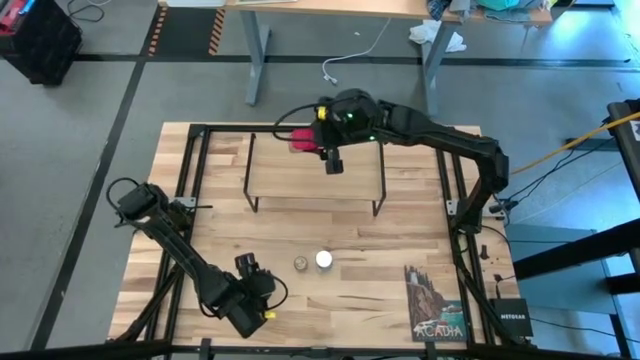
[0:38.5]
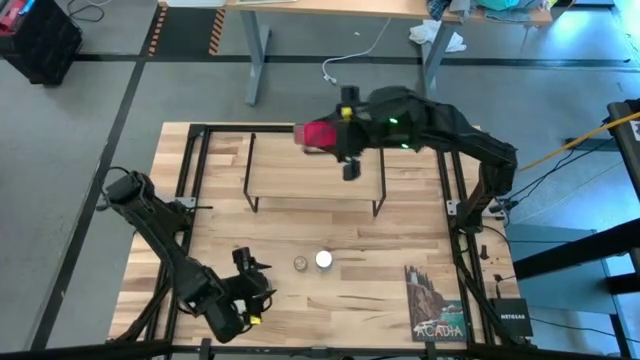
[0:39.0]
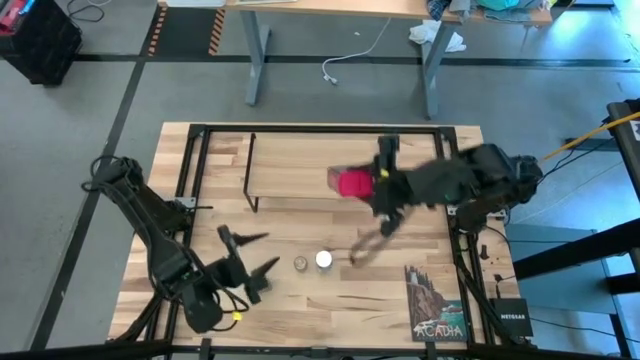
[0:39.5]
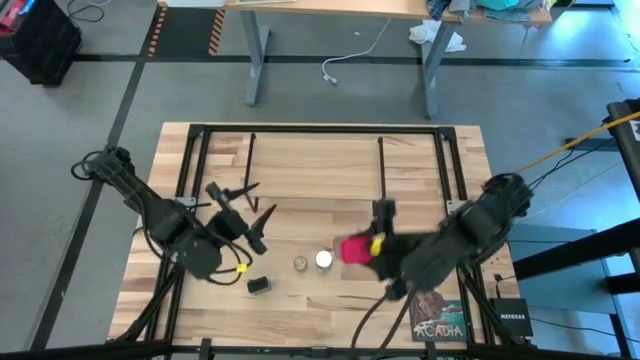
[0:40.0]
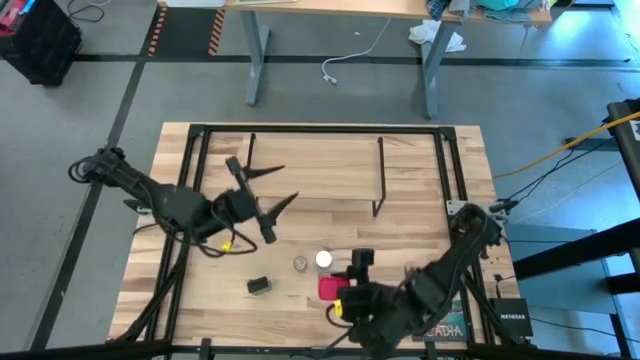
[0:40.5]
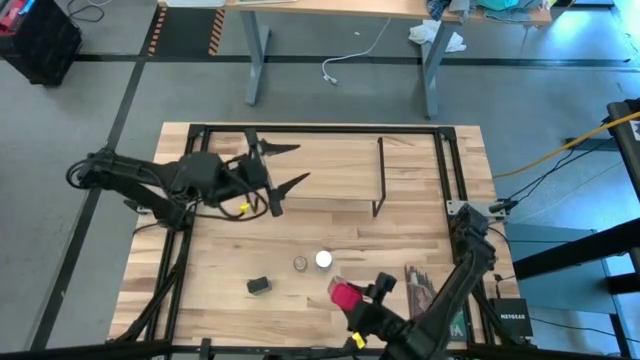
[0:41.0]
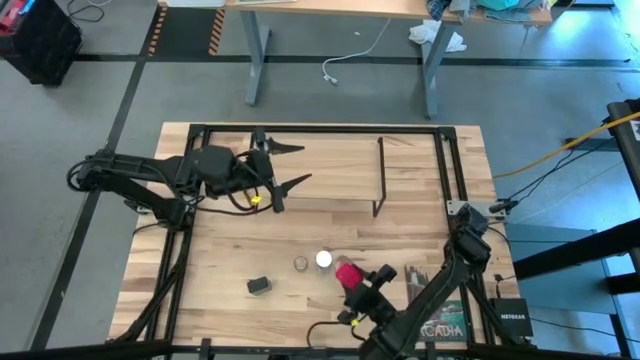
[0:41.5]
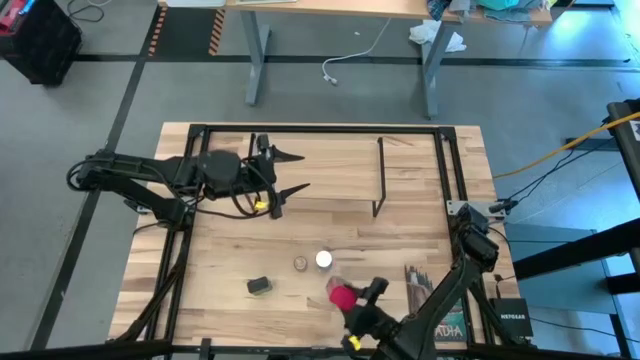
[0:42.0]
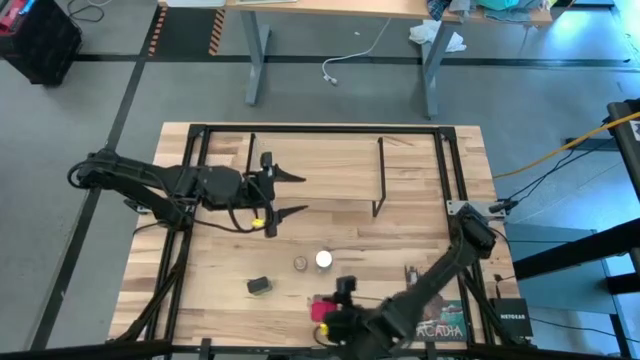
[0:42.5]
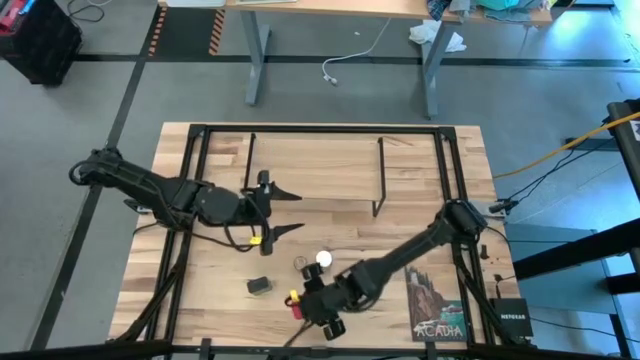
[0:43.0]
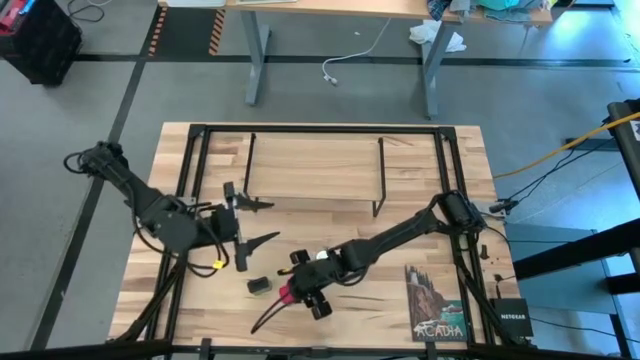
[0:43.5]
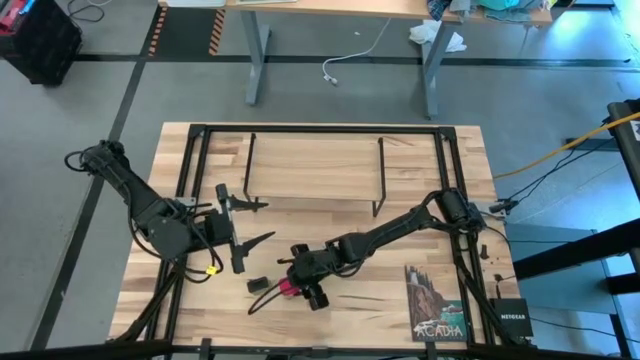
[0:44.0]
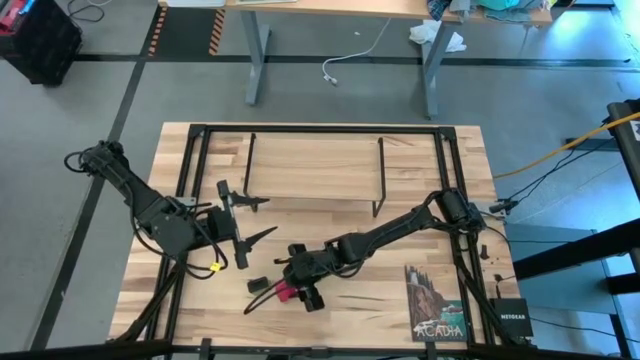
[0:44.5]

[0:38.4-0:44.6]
Task: Shelf spices
Remove the red seasoning can from the shelf

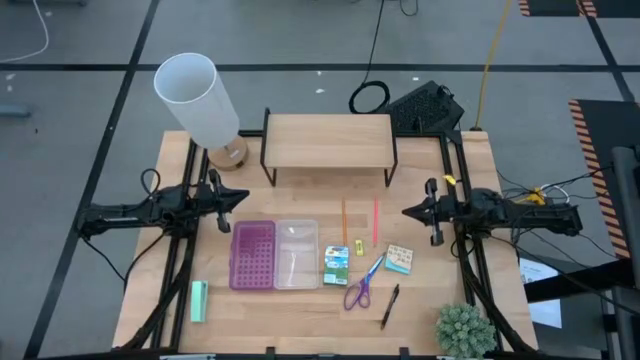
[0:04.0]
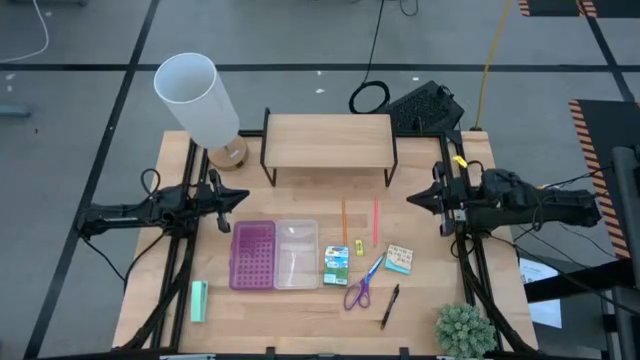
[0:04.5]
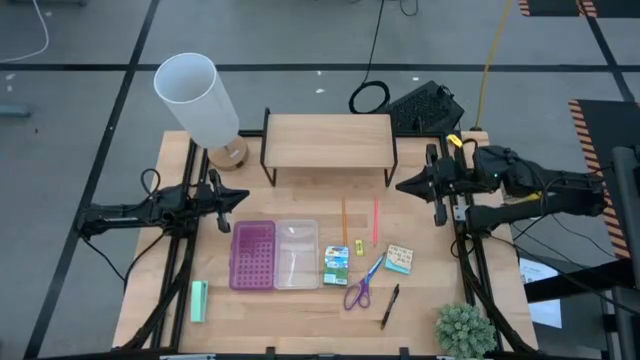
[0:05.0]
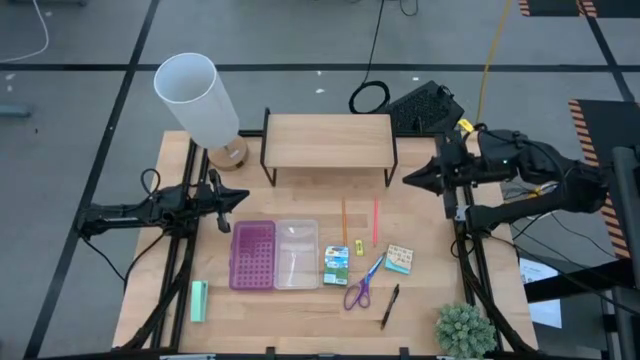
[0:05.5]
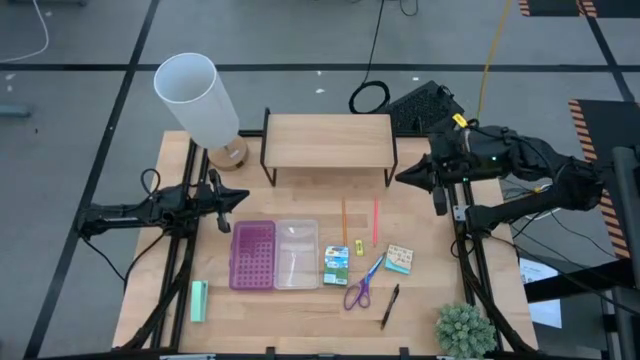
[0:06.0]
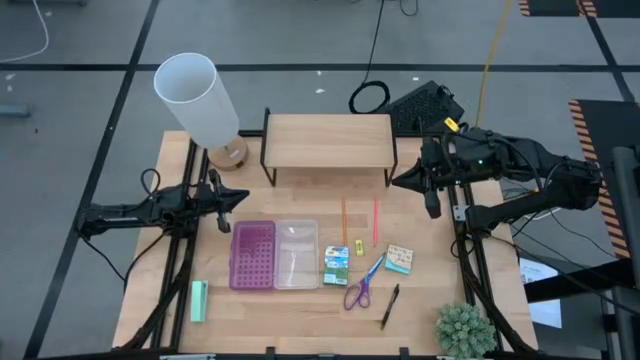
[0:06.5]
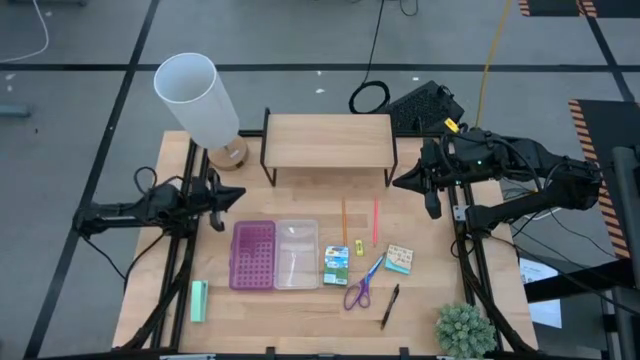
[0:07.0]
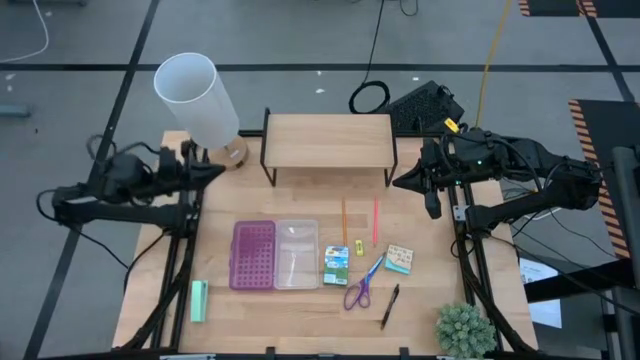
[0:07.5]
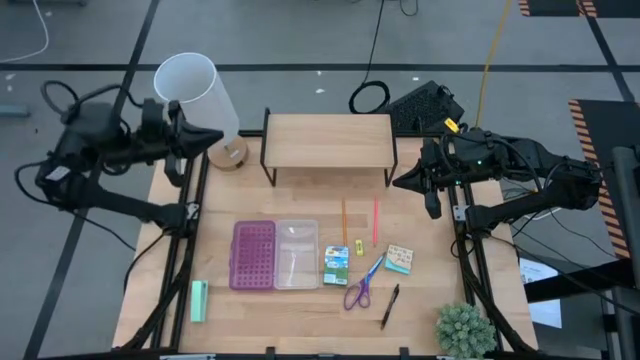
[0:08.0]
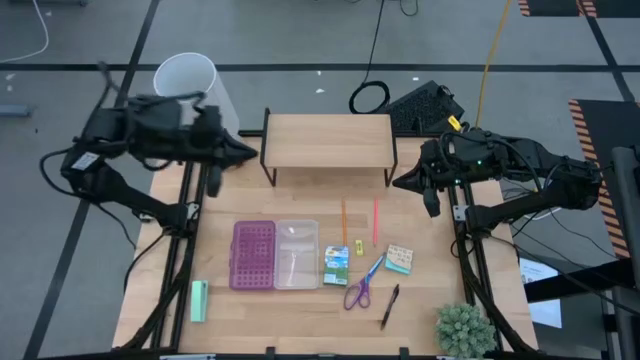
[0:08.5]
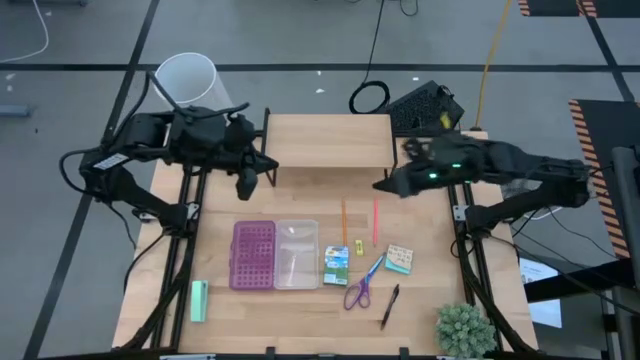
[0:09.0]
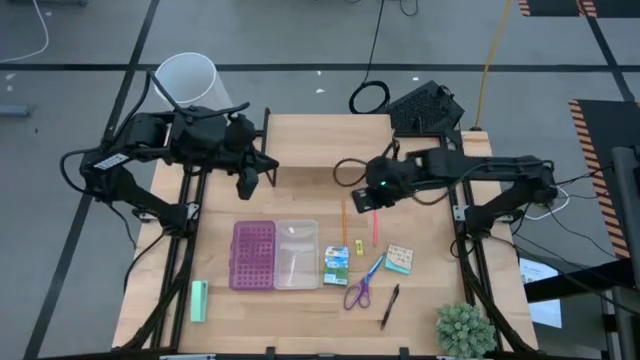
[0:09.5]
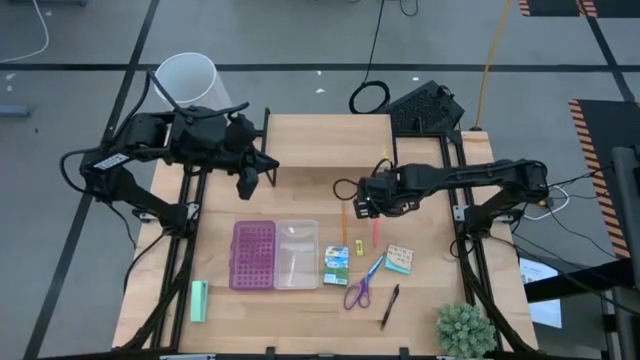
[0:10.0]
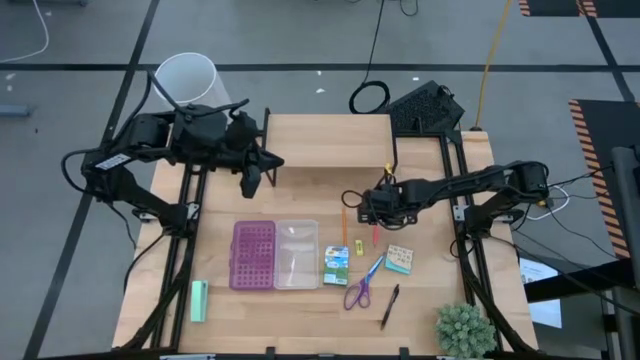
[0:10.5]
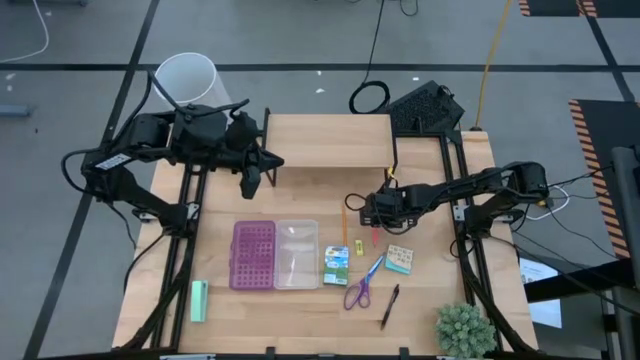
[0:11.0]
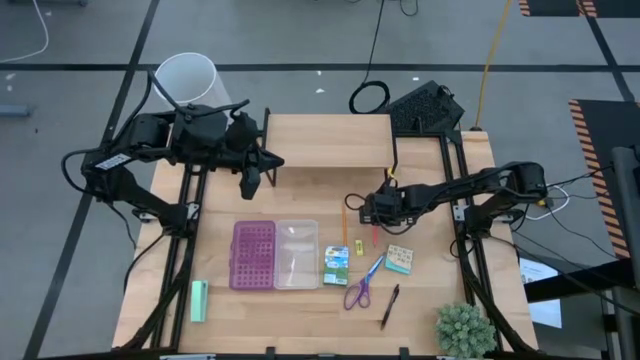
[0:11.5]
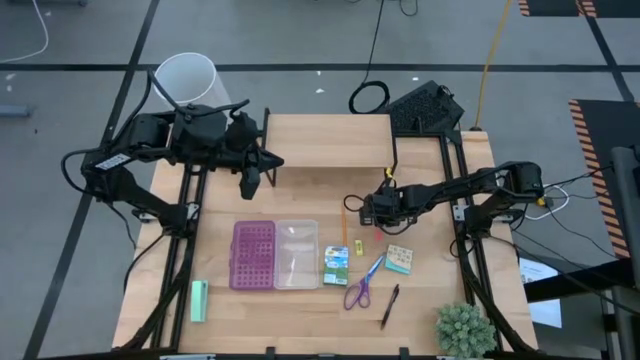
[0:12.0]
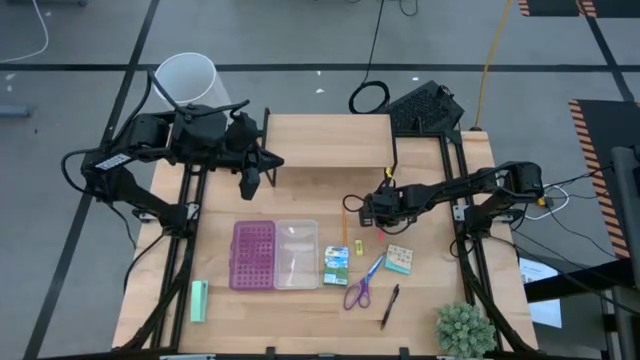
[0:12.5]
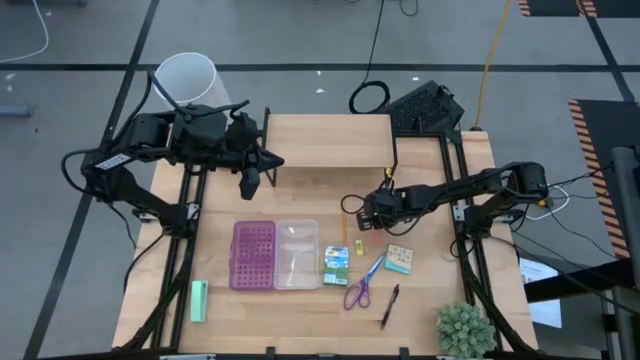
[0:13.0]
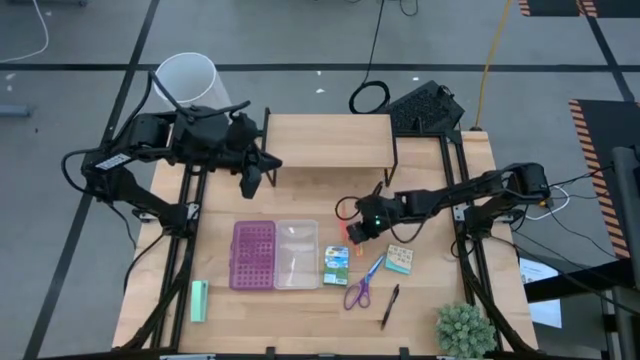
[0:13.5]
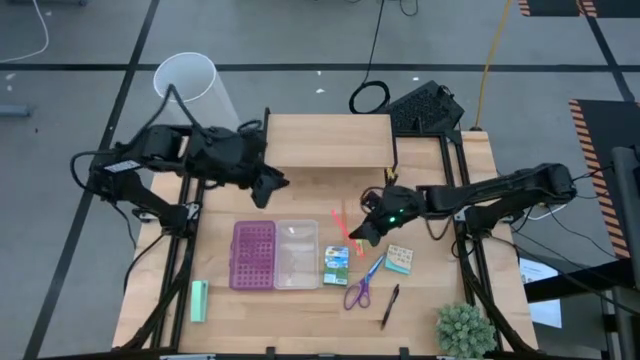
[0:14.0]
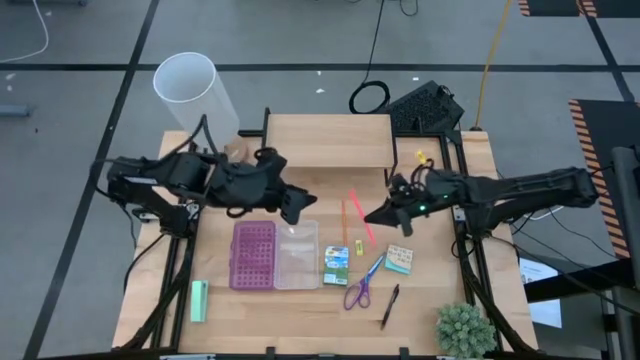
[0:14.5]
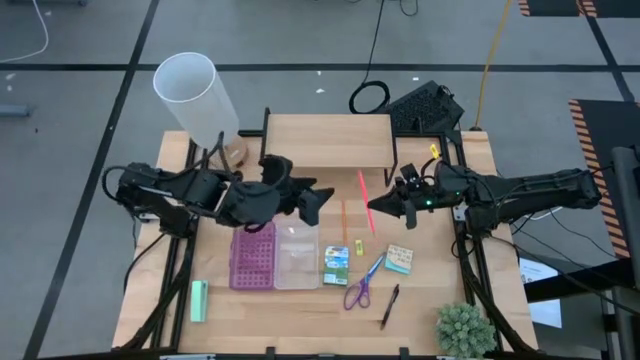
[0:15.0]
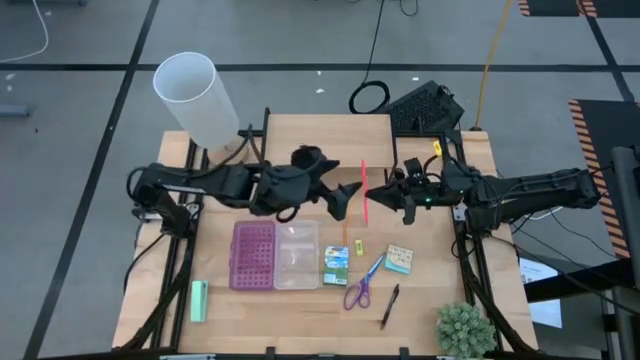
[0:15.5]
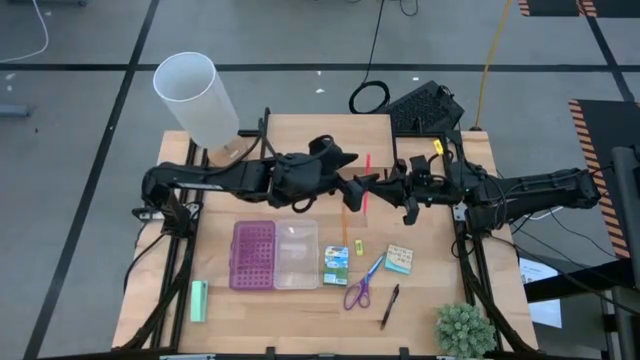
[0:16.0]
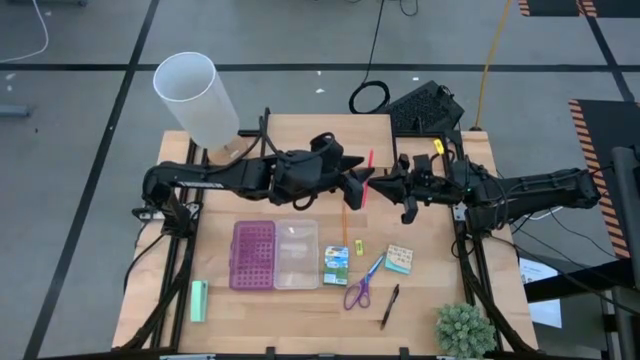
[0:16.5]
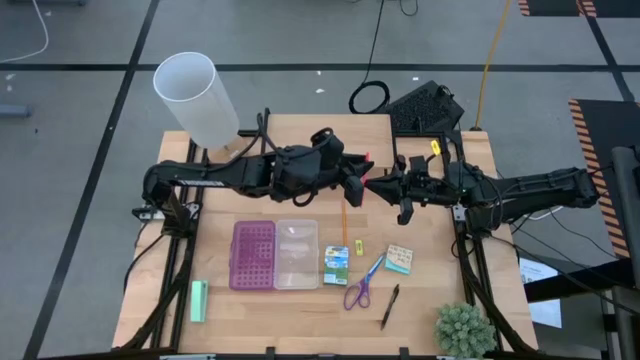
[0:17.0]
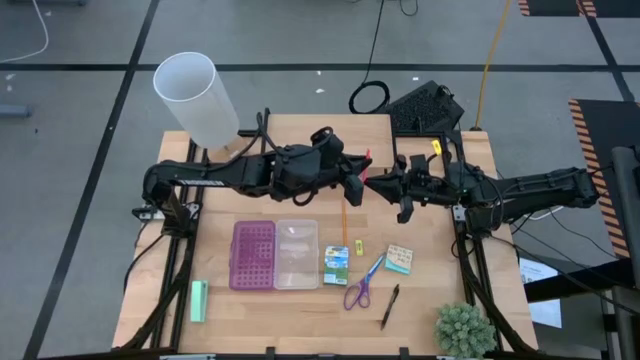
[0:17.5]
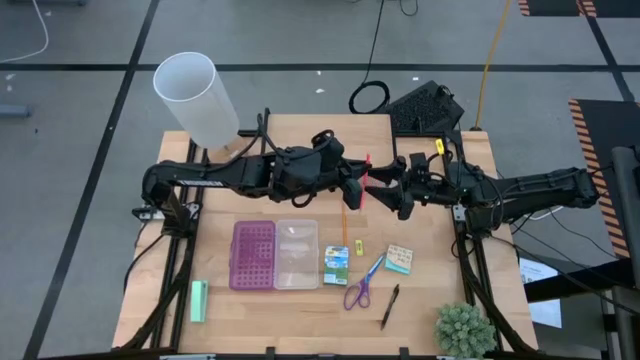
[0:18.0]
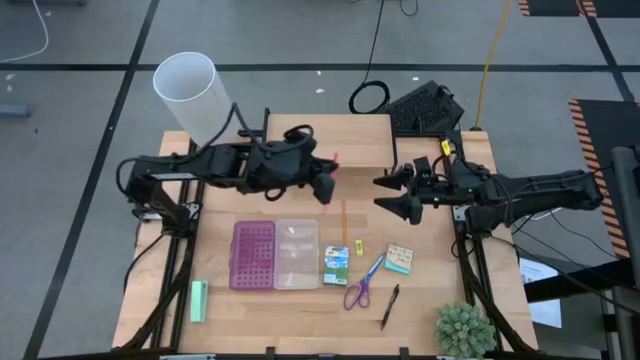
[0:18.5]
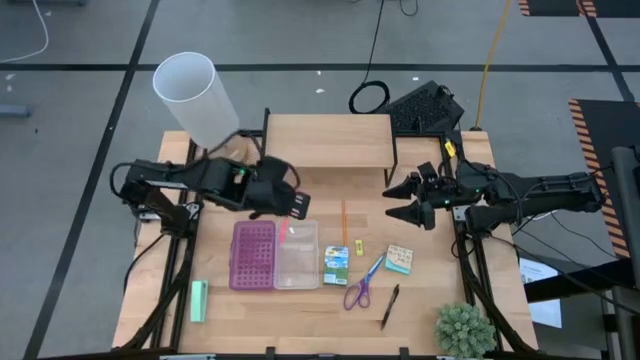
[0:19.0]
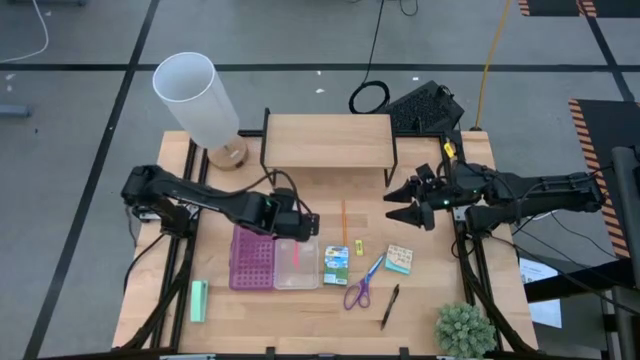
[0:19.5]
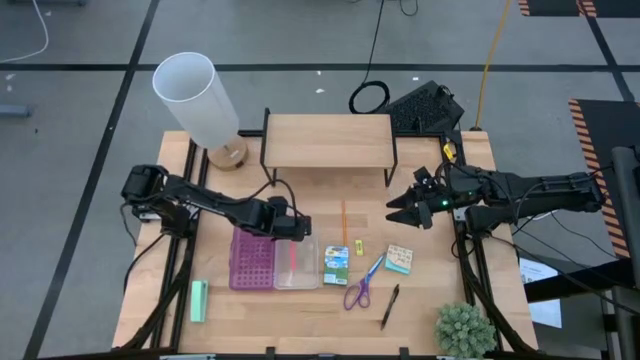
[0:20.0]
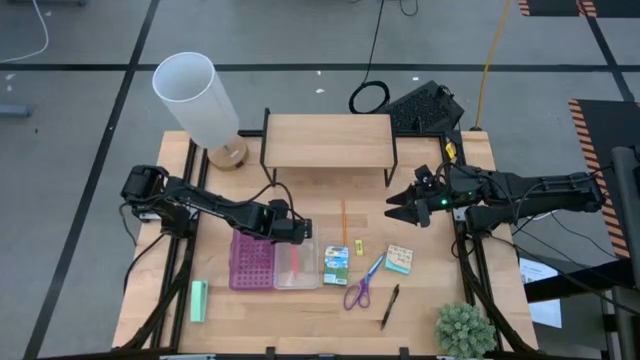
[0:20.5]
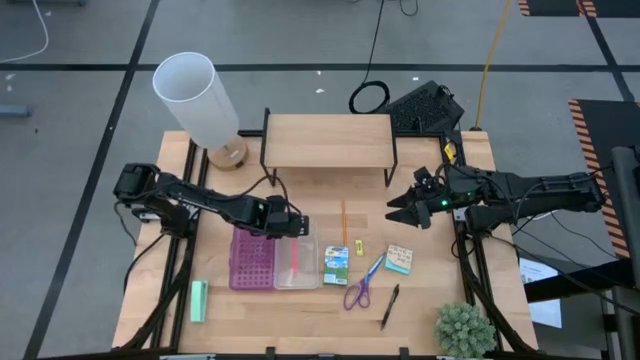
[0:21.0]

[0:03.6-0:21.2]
Task: Pack school essentials
Put the pink pencil into the violet supply box
